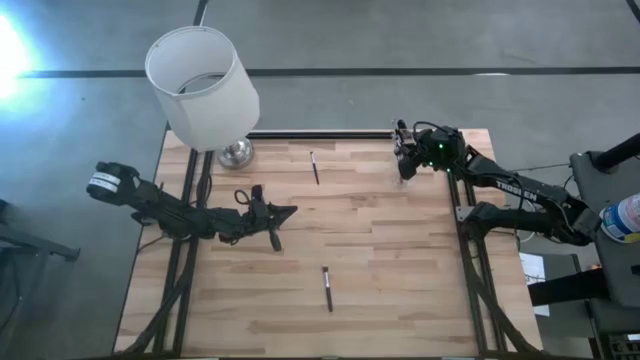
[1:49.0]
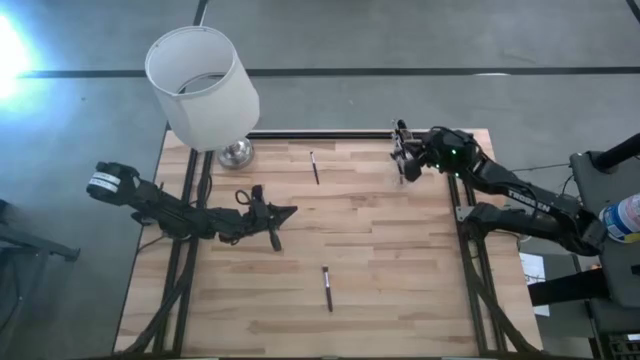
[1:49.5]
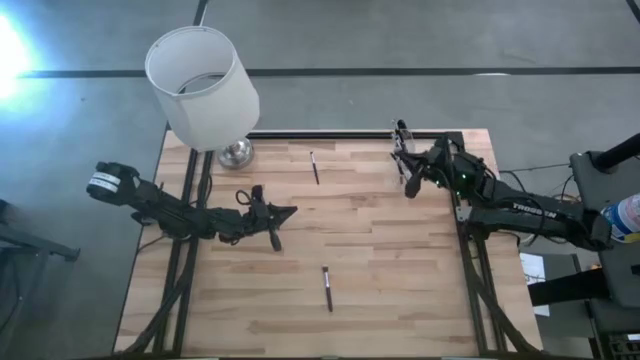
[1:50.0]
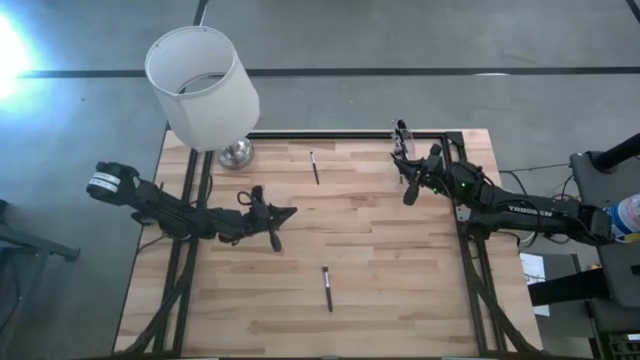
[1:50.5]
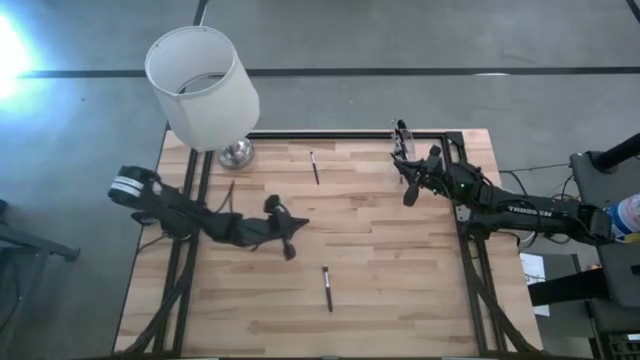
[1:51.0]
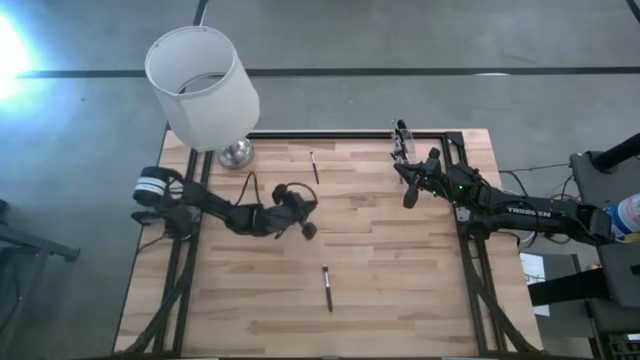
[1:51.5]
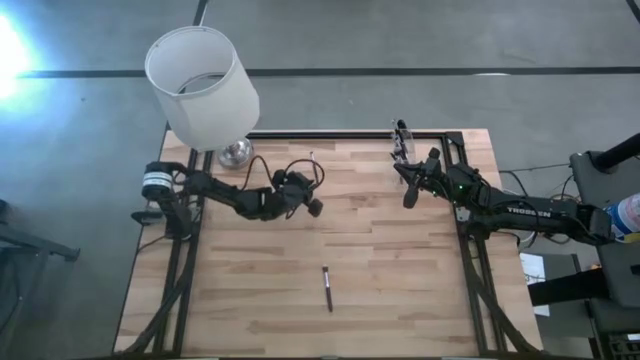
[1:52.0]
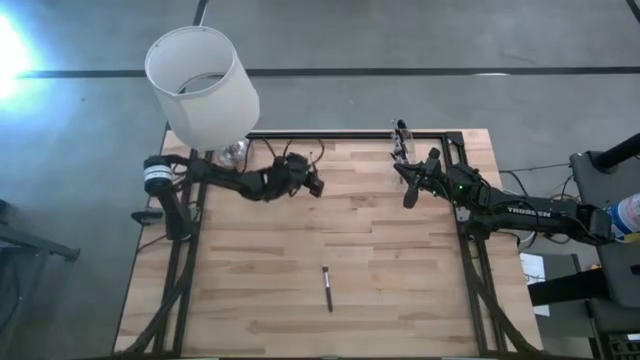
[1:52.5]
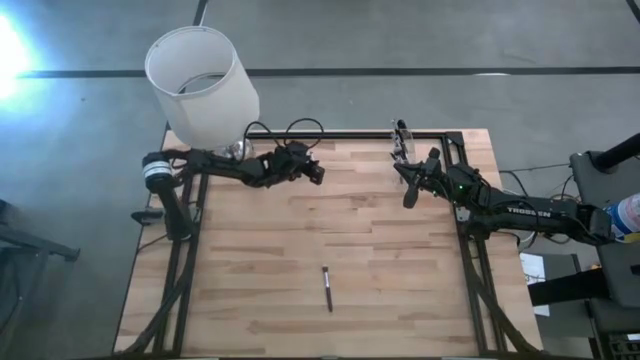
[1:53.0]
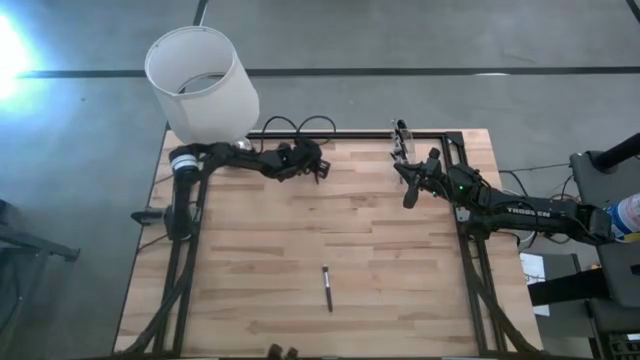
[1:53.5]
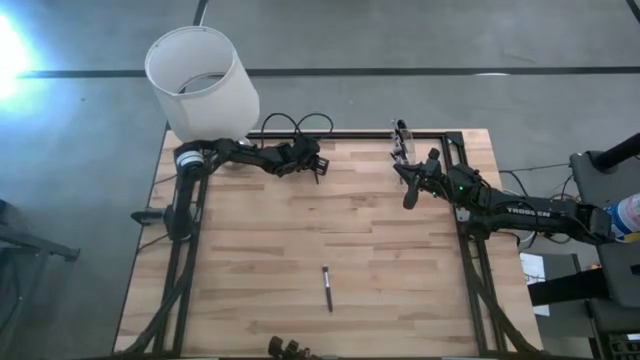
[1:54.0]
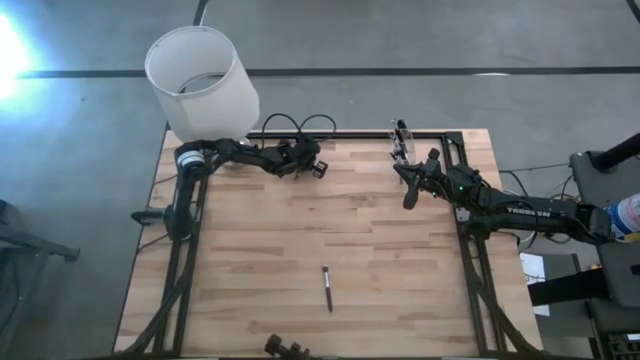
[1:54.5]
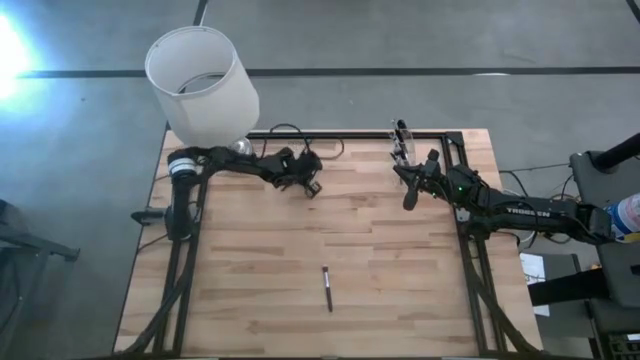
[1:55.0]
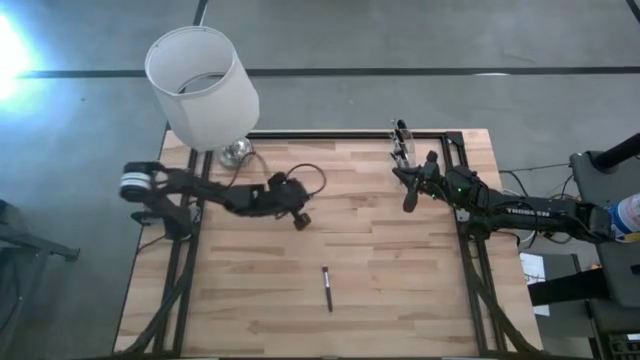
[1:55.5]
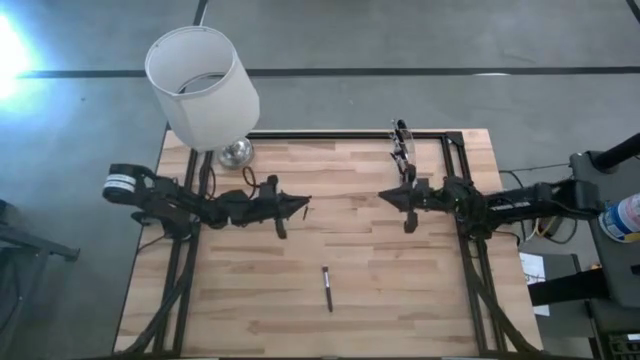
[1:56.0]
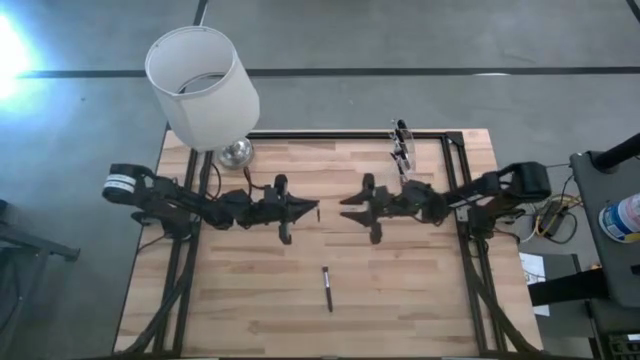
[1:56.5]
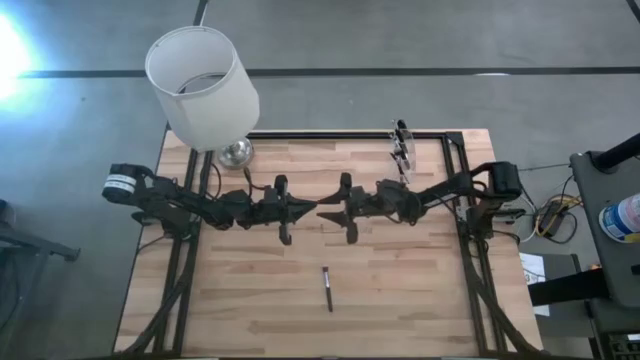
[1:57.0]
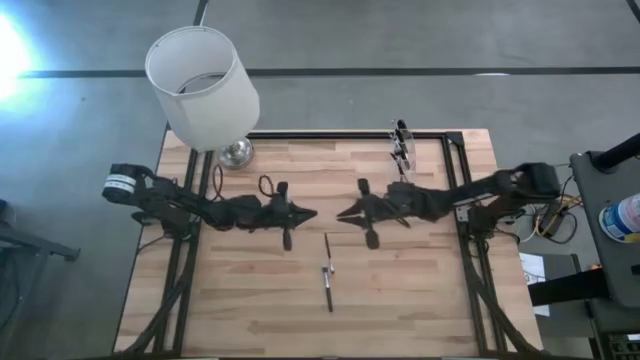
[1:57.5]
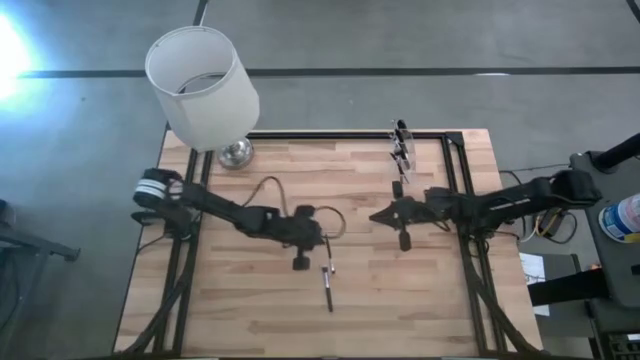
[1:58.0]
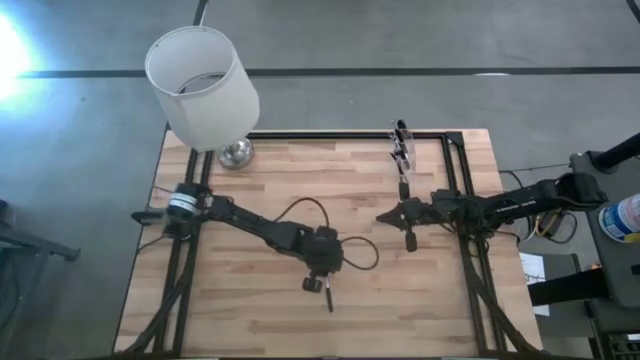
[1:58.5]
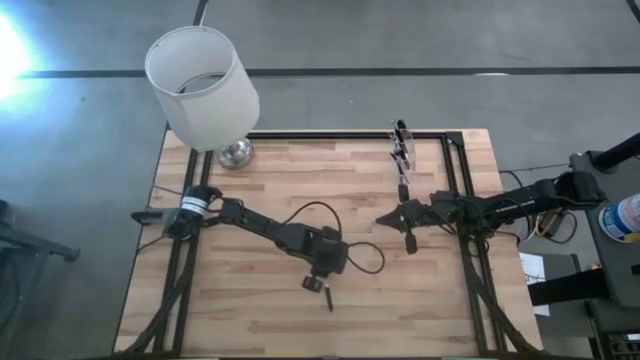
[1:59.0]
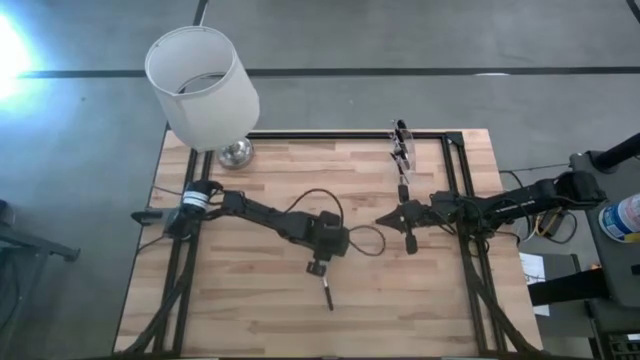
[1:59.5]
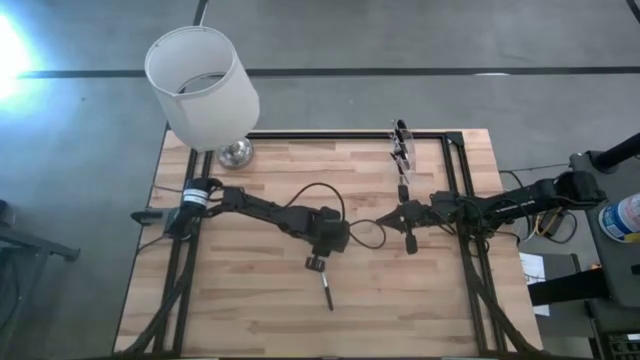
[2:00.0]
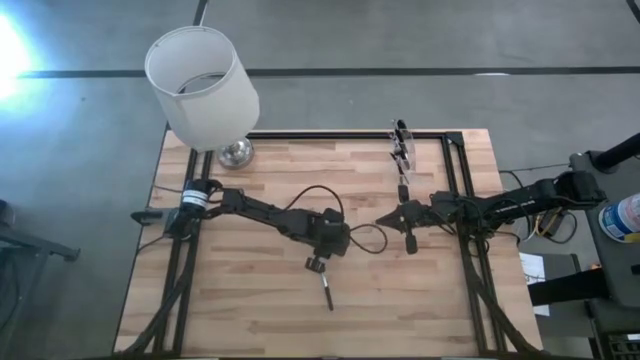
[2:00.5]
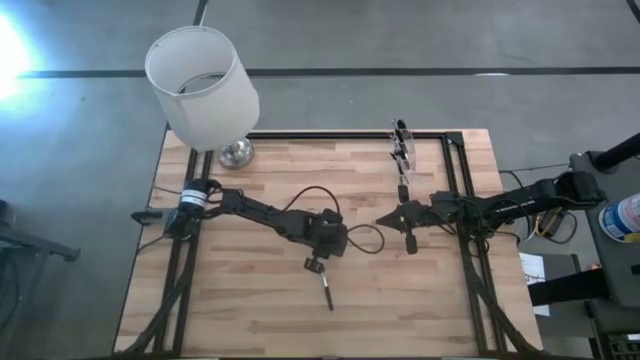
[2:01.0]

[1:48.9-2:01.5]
Task: Put items in baskets/containers
Put the foundation brush into the transparent organizer

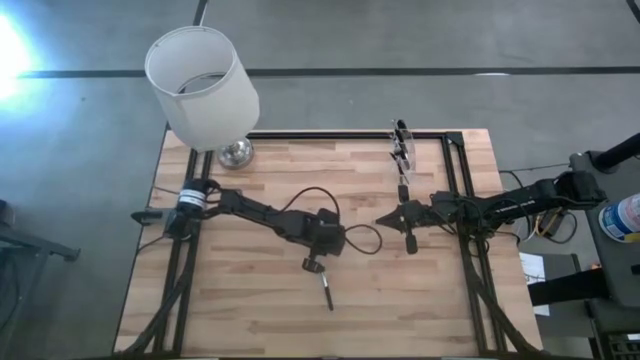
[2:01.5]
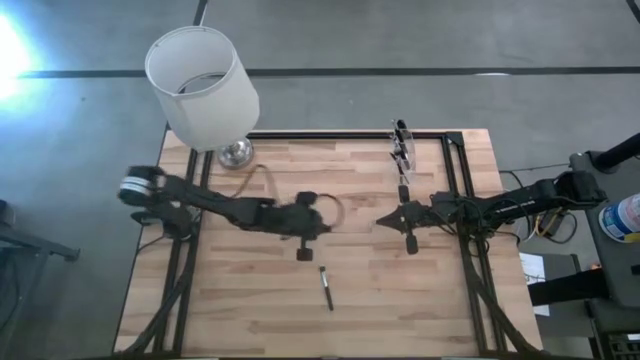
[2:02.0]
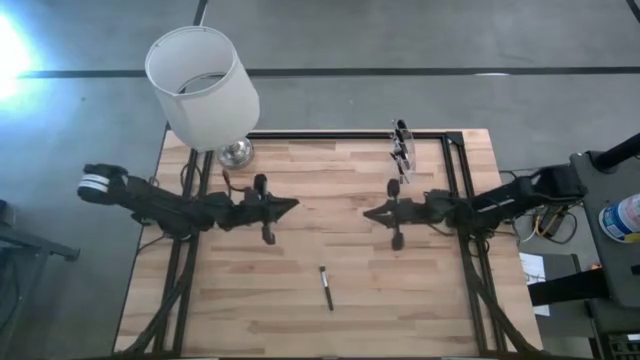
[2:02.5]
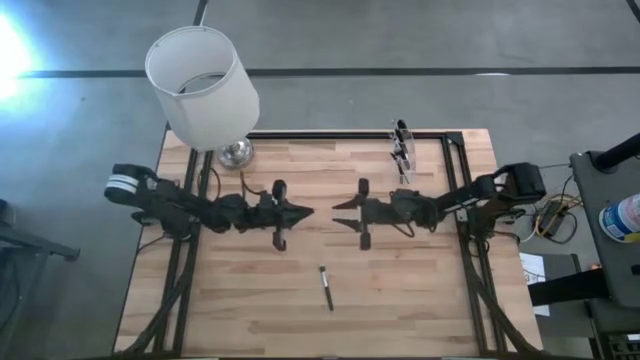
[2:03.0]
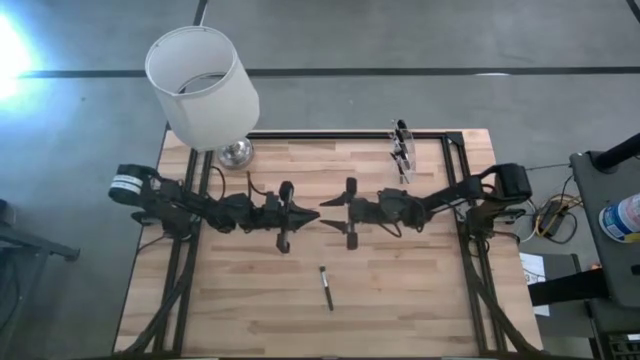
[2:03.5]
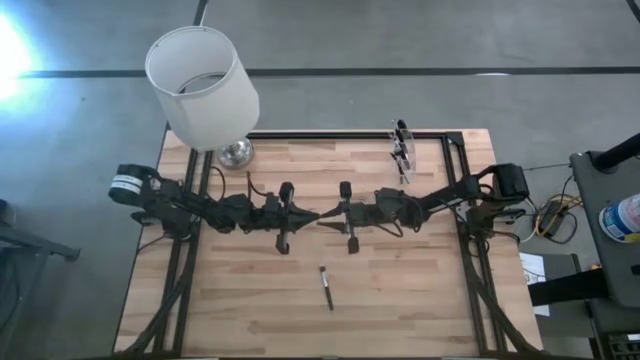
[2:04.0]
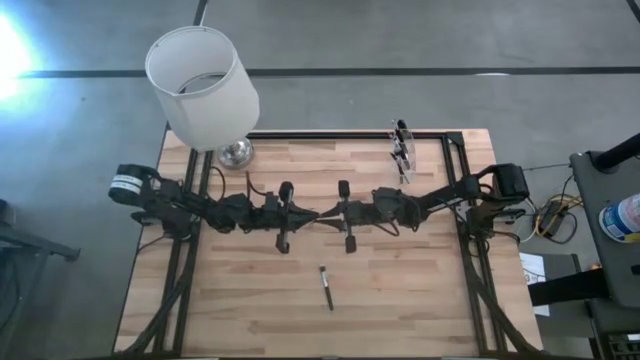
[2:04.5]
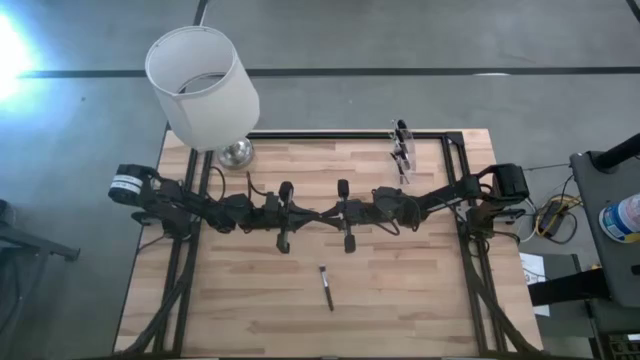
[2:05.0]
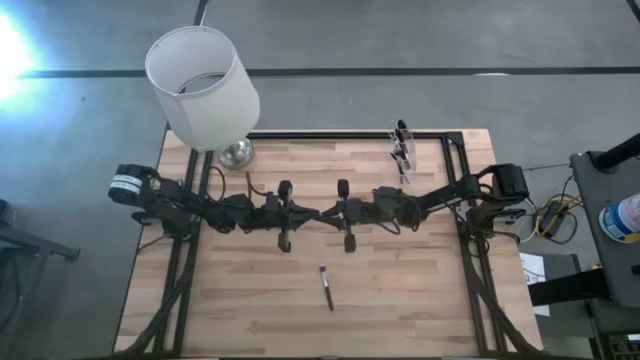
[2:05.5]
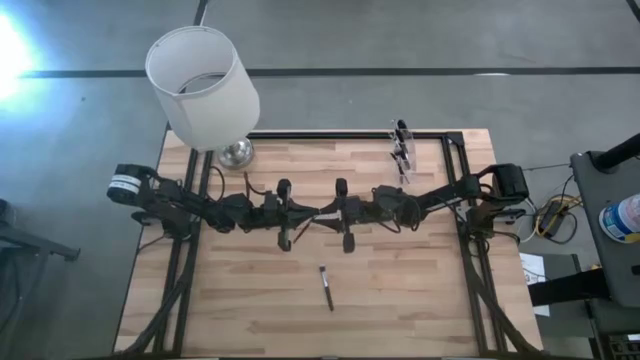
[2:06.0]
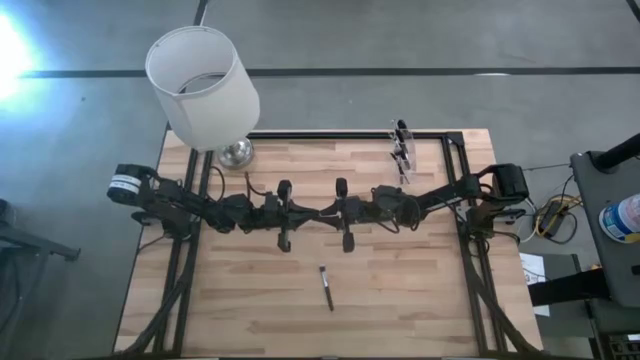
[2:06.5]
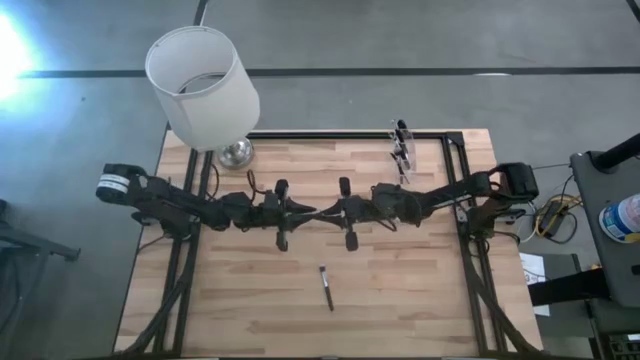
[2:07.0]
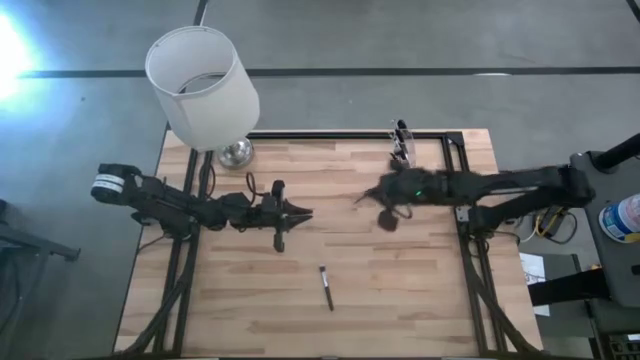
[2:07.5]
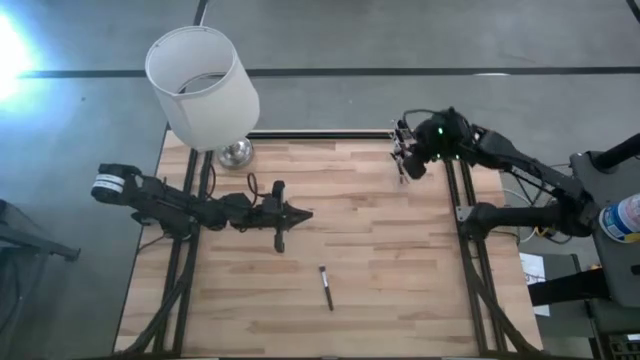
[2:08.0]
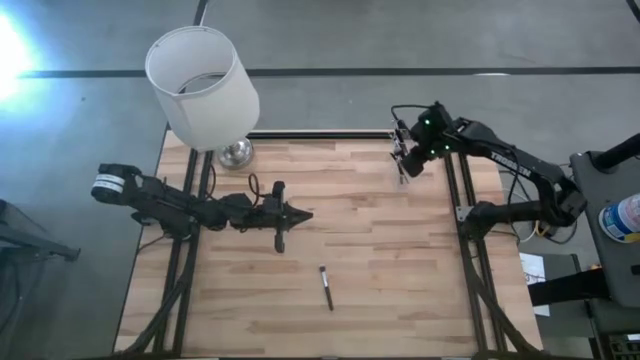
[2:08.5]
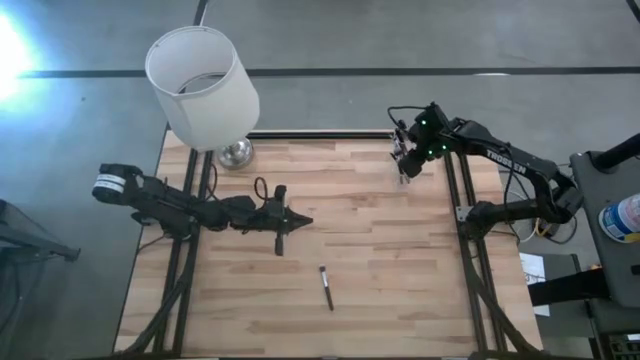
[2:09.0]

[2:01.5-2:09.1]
Put the foundation brush into the transparent organizer

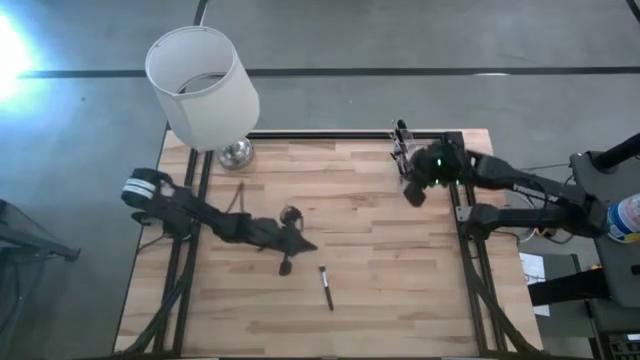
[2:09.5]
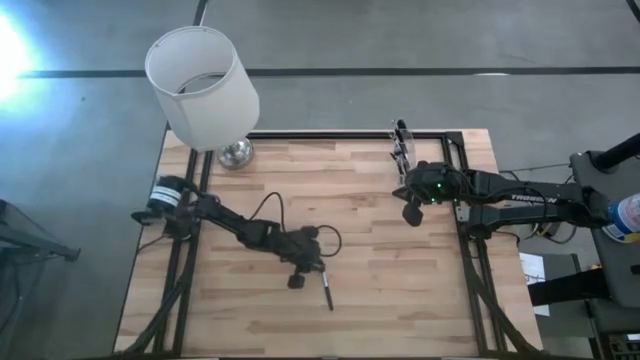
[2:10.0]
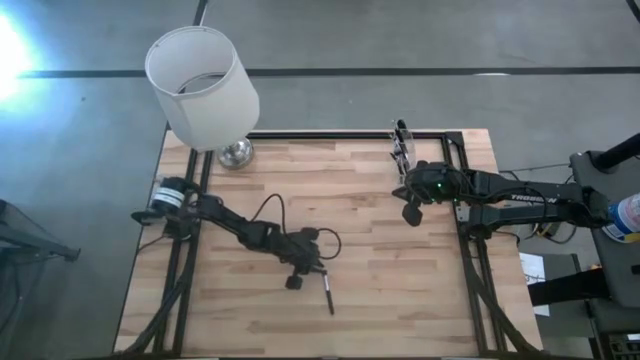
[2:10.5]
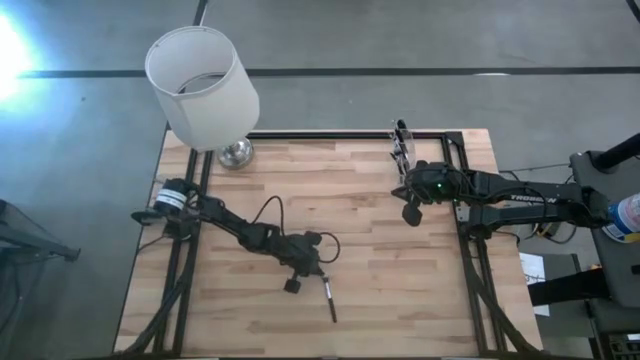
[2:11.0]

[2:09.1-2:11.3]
Put the foundation brush into the transparent organizer
